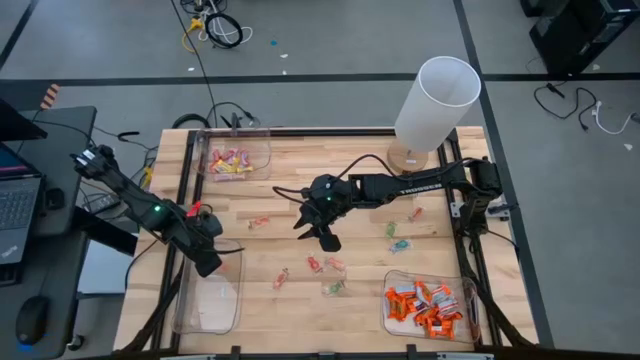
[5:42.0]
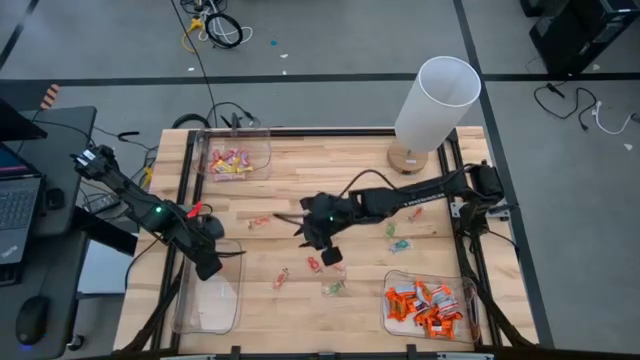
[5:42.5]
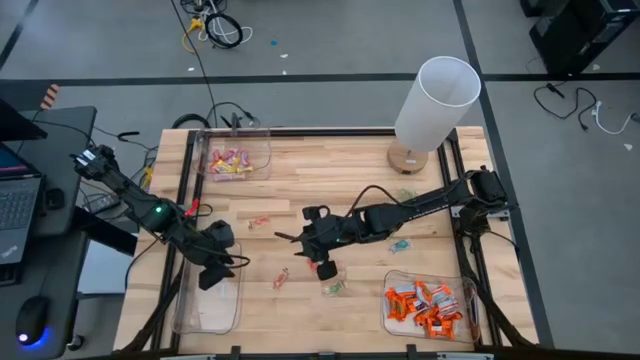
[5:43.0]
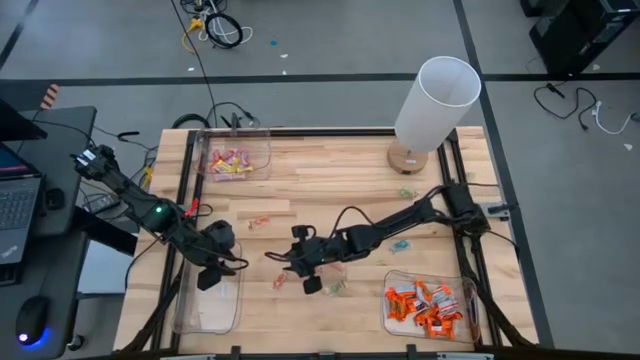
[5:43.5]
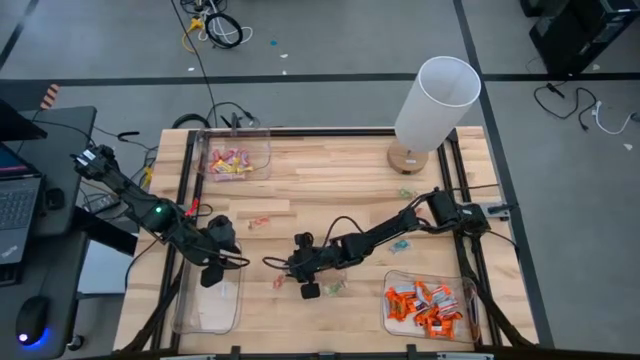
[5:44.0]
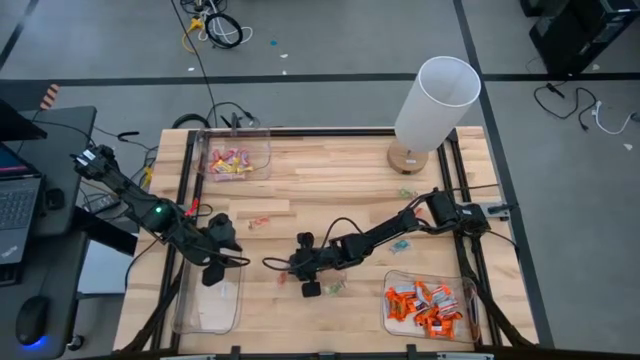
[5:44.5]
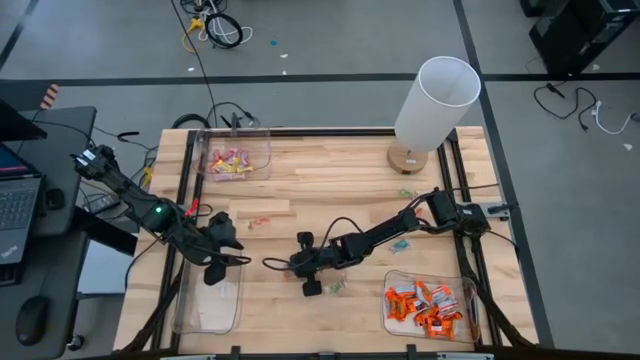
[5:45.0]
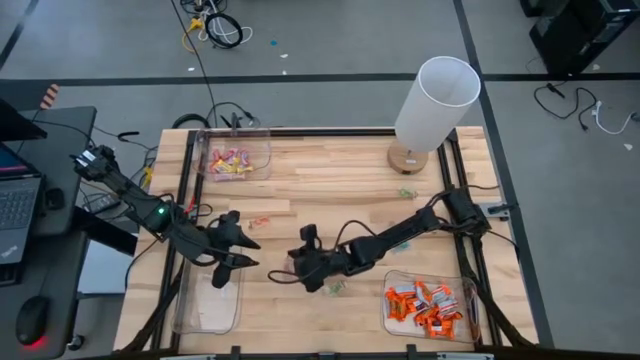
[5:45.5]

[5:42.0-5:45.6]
Task: Sort candy
Put the orange gummy into the bottom left transparent bin

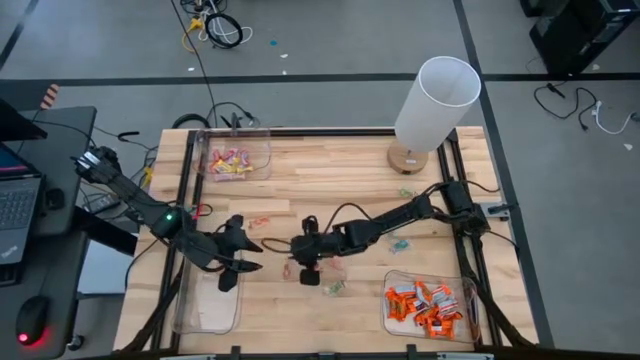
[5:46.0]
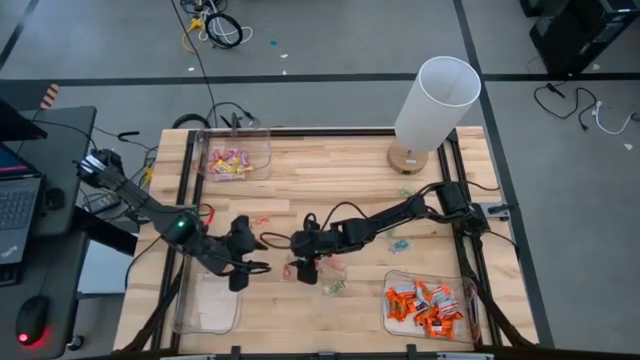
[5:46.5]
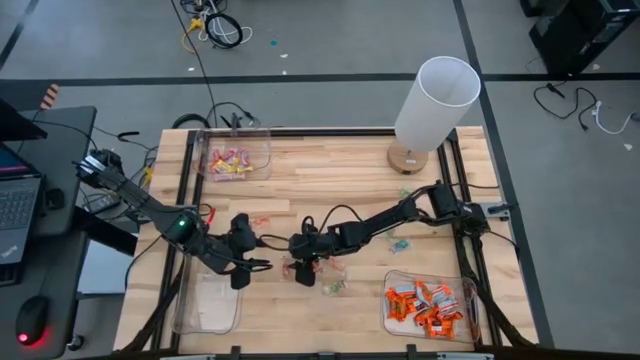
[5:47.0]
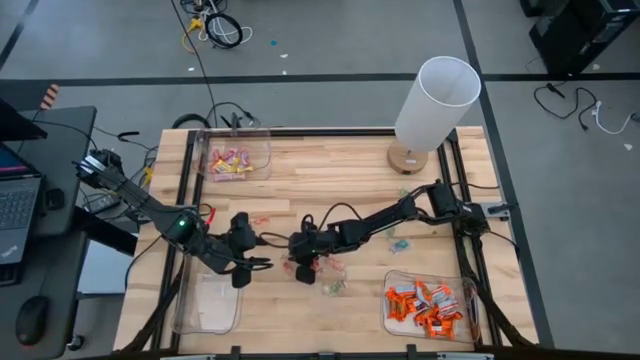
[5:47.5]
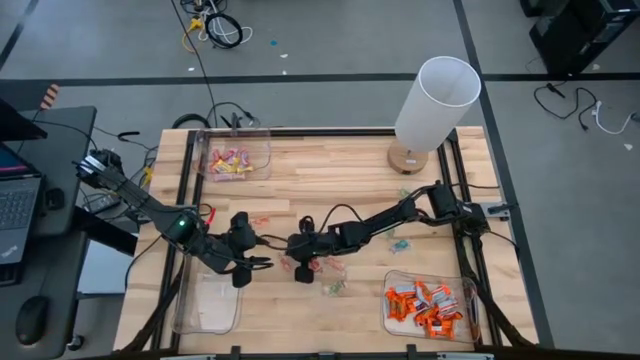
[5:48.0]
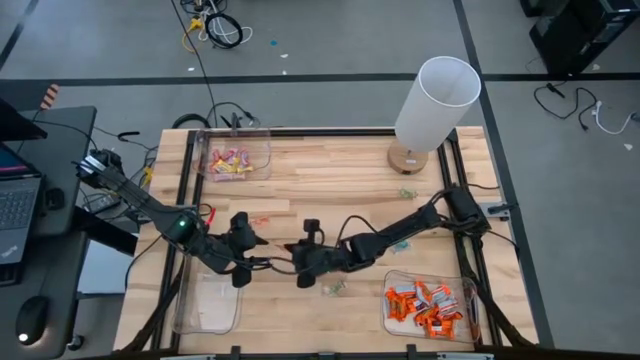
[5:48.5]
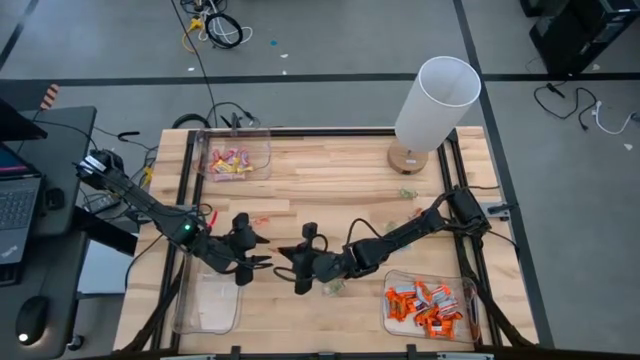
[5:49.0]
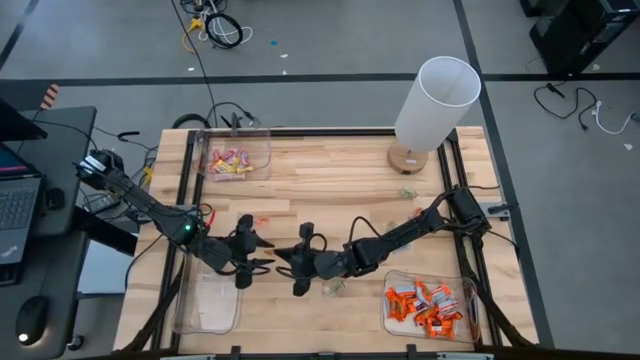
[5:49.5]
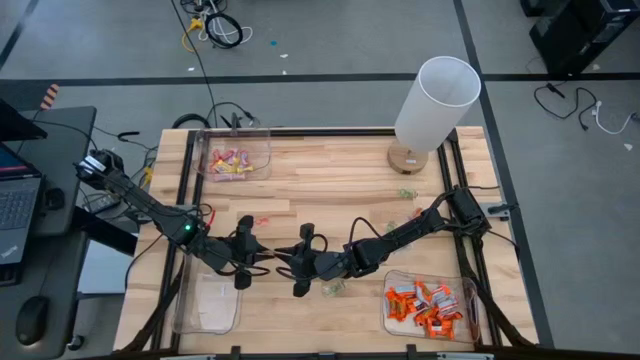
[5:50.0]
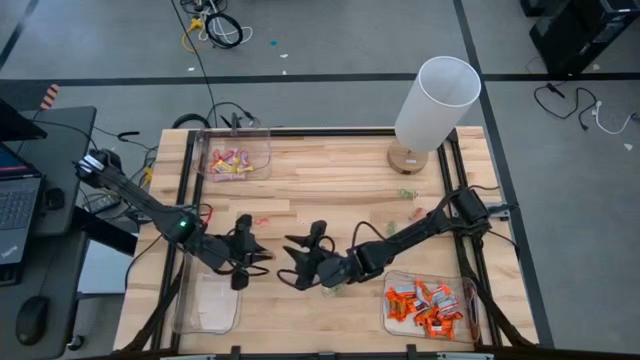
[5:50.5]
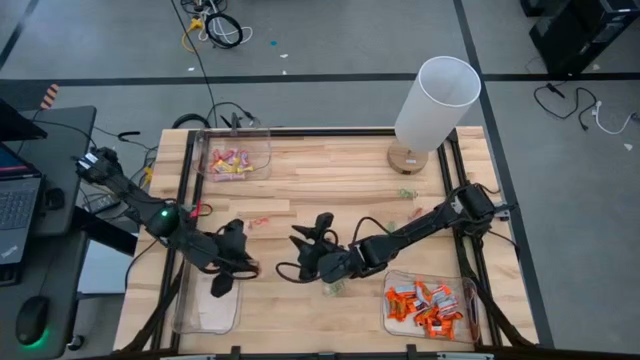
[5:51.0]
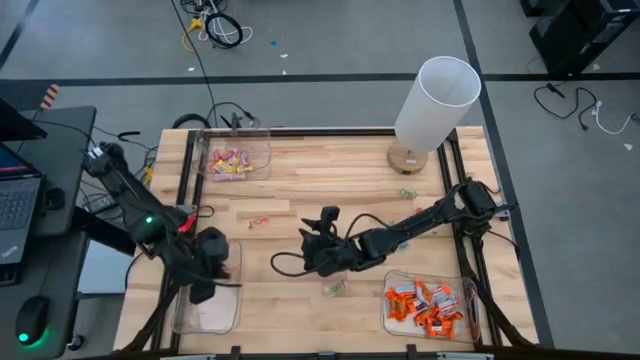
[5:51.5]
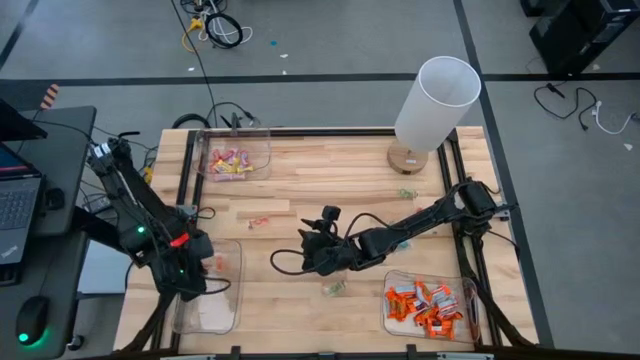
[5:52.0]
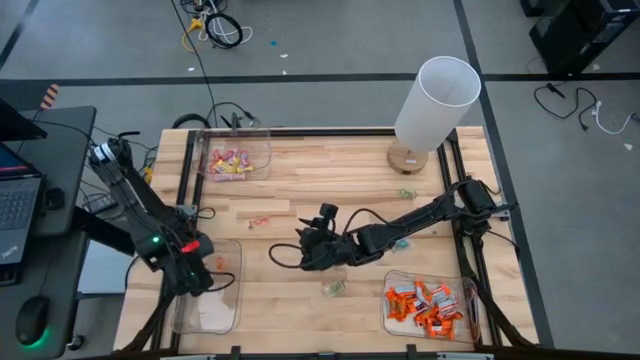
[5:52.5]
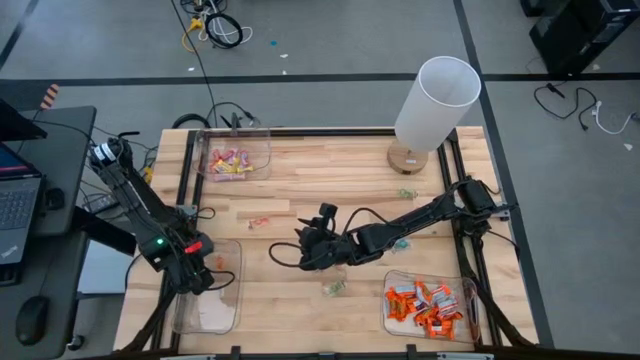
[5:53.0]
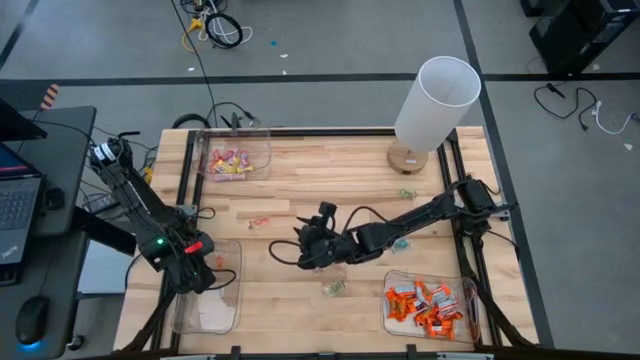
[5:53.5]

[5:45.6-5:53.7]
Put the orange gummy into the bottom left transparent bin

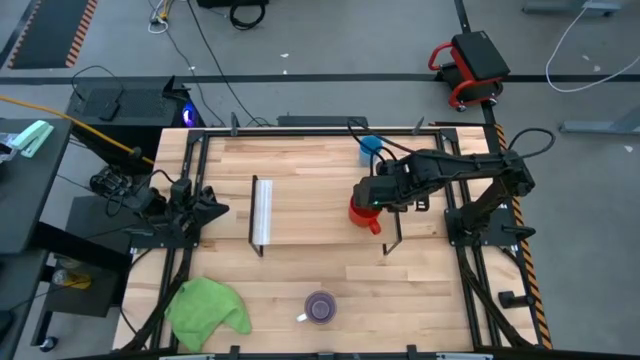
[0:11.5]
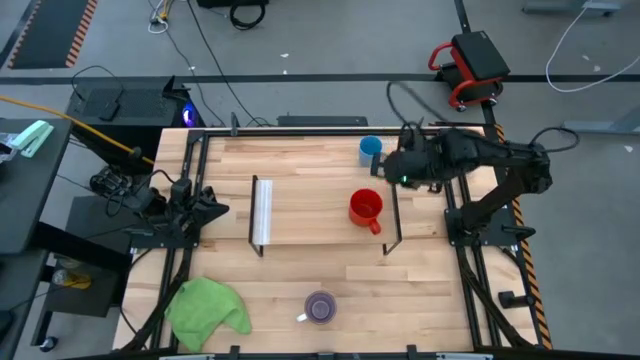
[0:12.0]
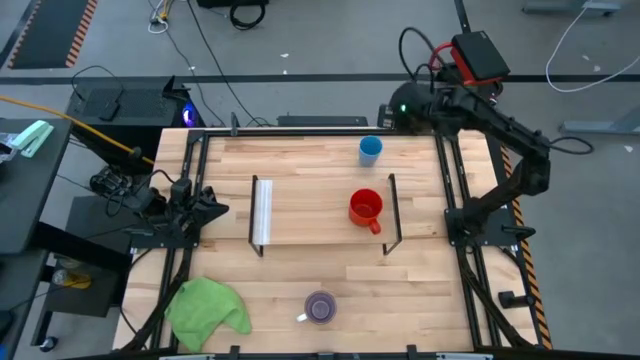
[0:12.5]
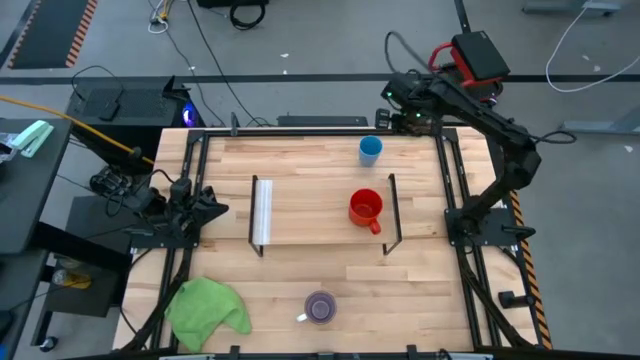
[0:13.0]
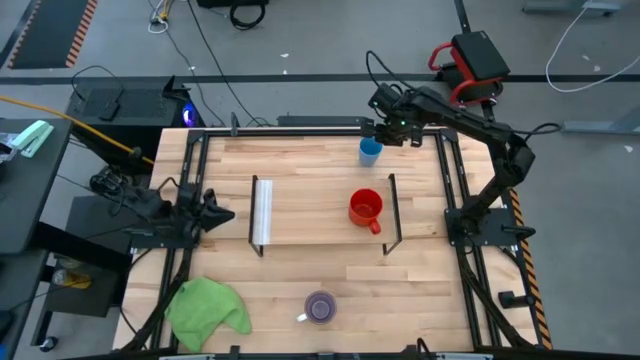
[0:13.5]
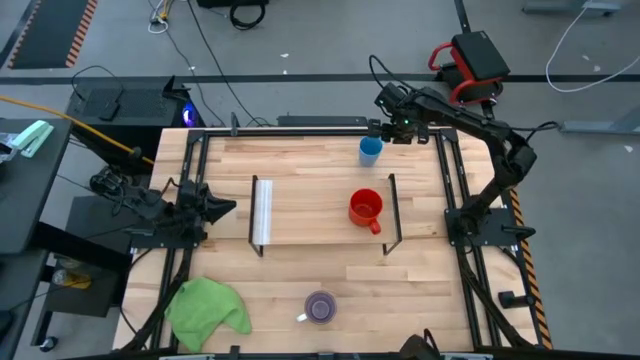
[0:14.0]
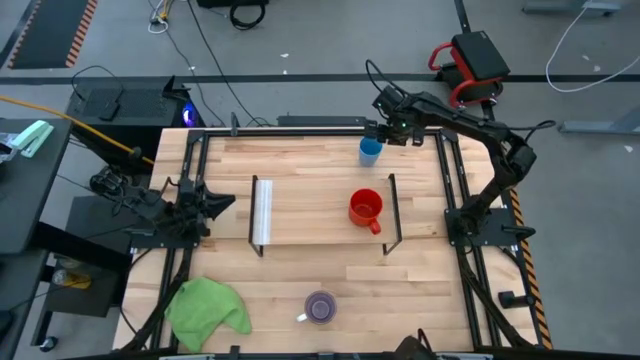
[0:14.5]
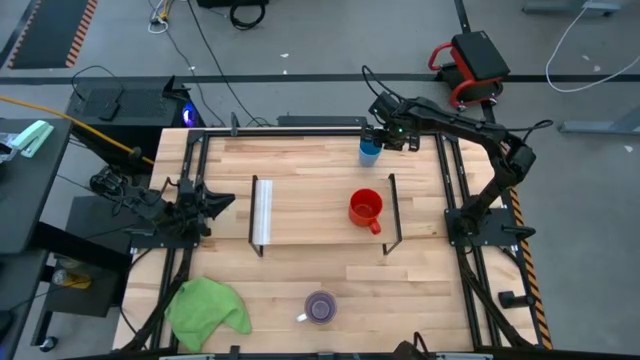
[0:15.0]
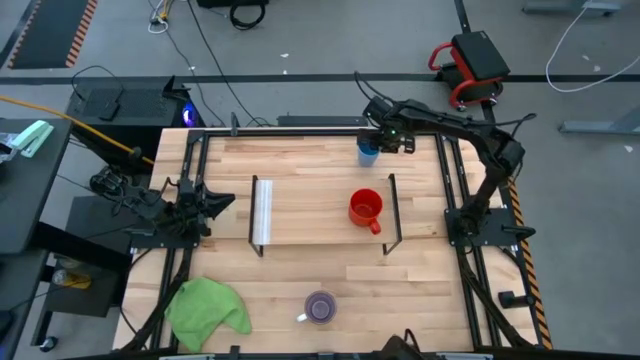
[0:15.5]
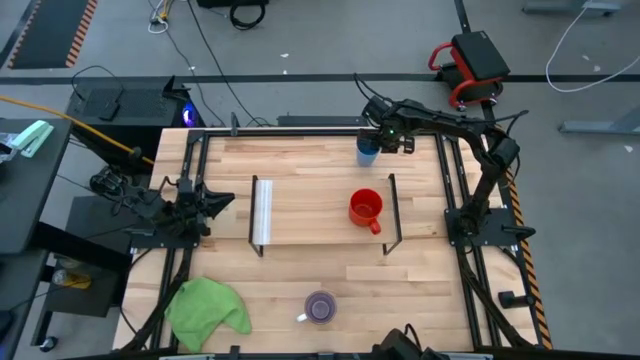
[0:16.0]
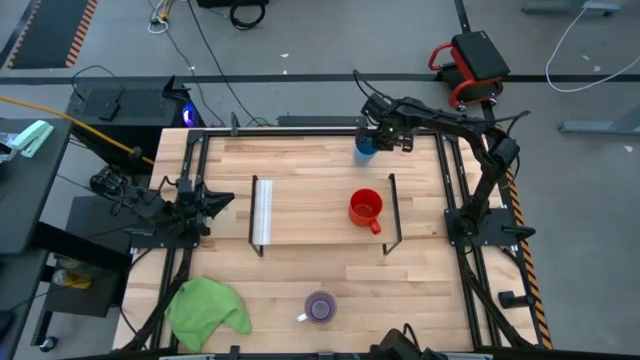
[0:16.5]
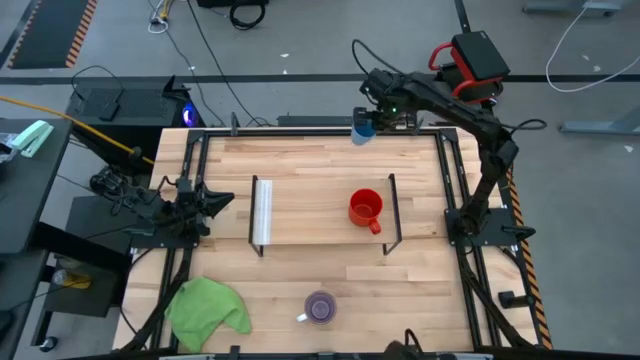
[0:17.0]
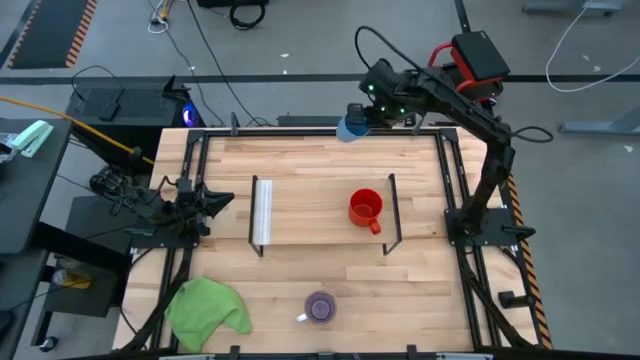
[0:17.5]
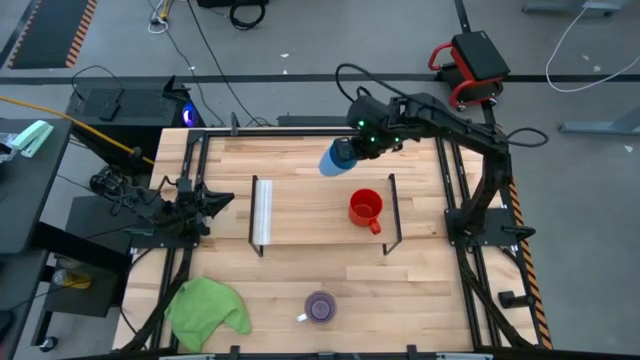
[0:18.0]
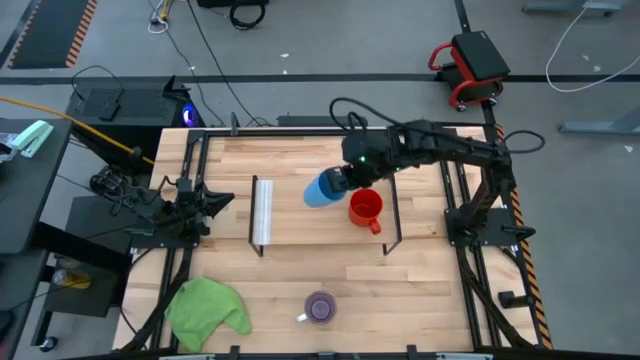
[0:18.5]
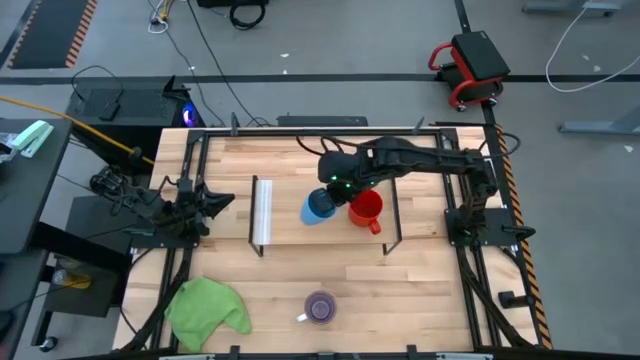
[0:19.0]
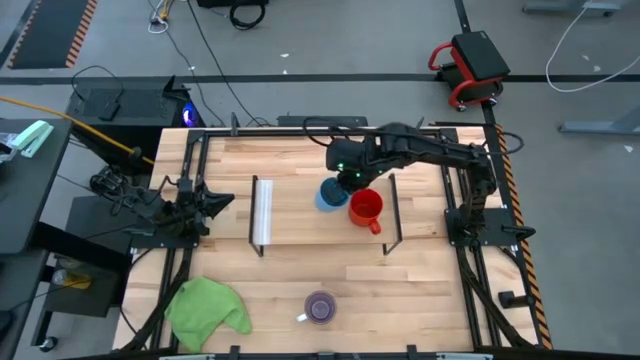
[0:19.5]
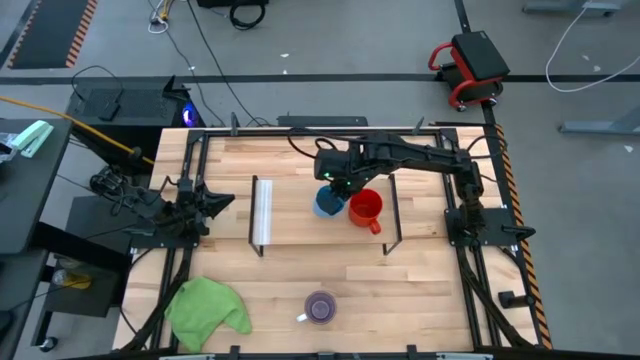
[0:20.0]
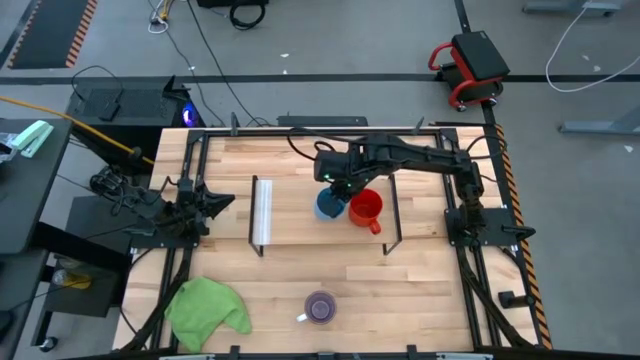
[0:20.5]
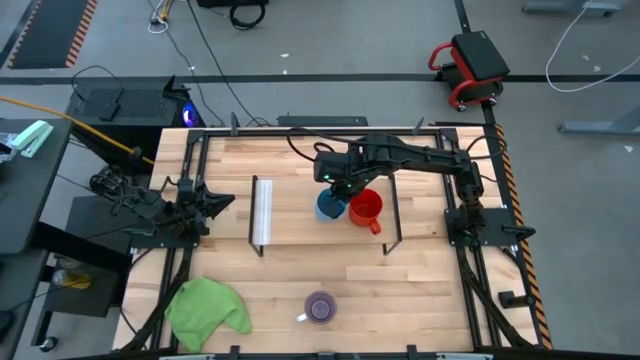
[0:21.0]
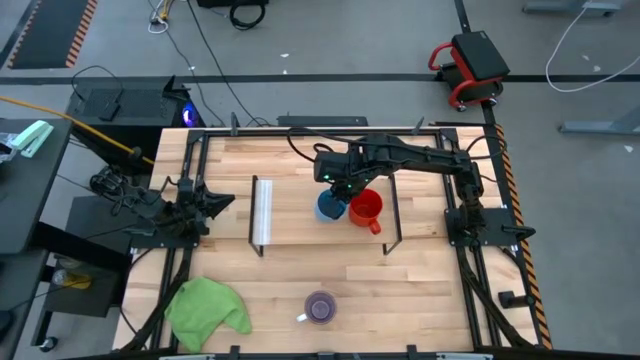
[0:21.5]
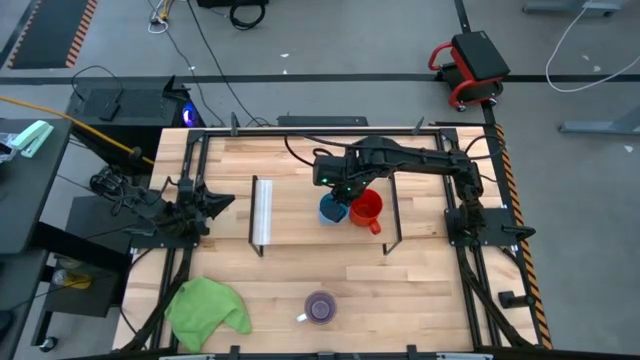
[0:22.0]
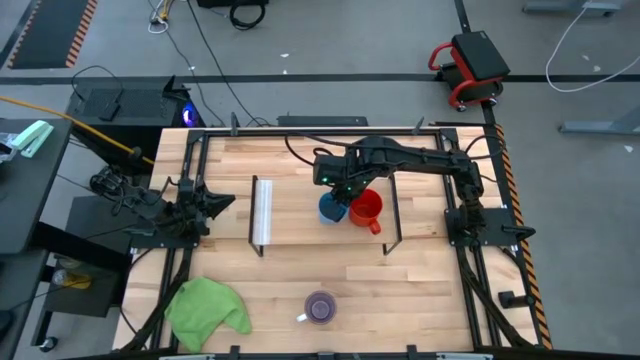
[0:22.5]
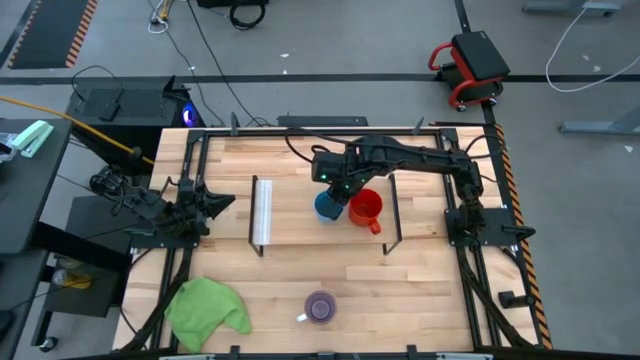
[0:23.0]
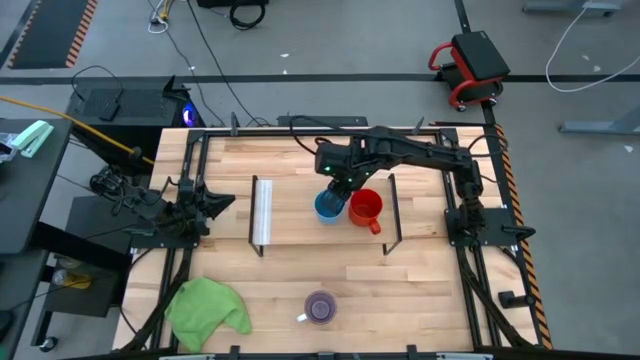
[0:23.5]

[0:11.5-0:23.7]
Task: Stack small to large cups/mugs on shelf
Put the blue cup to the left of the red mug on the shelf
